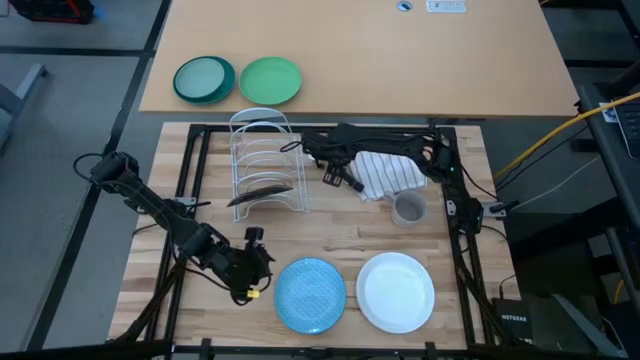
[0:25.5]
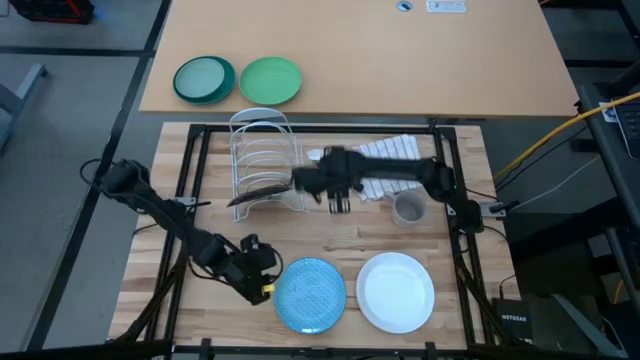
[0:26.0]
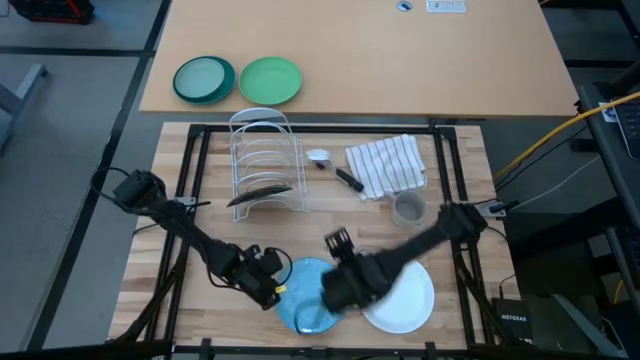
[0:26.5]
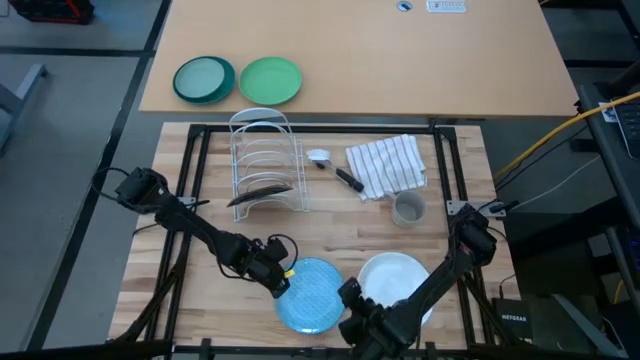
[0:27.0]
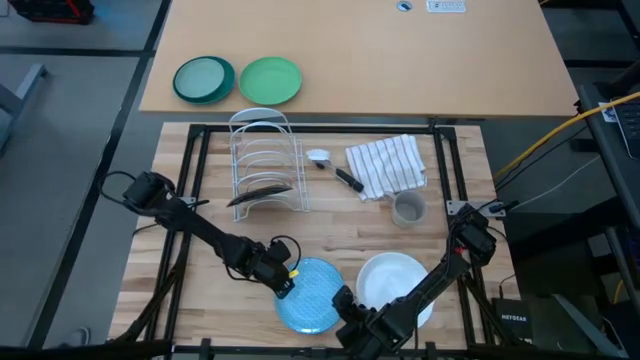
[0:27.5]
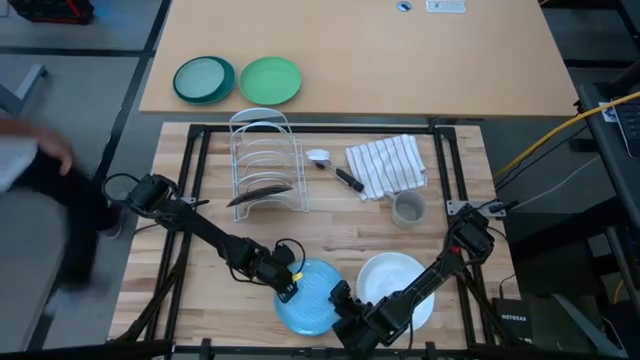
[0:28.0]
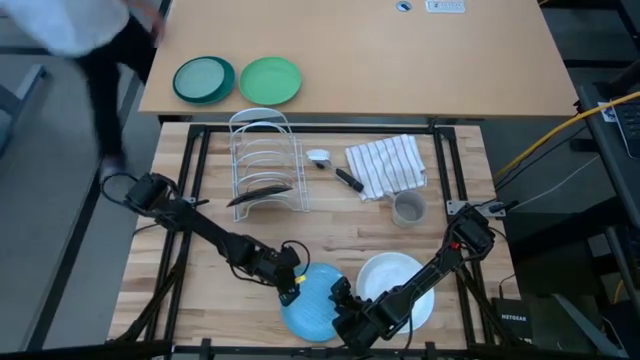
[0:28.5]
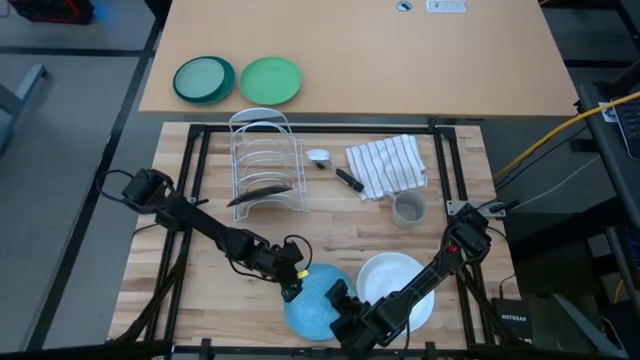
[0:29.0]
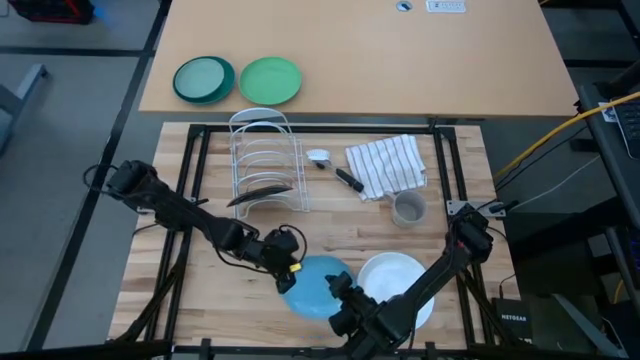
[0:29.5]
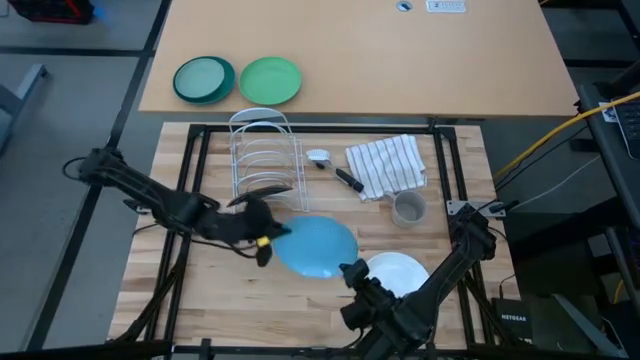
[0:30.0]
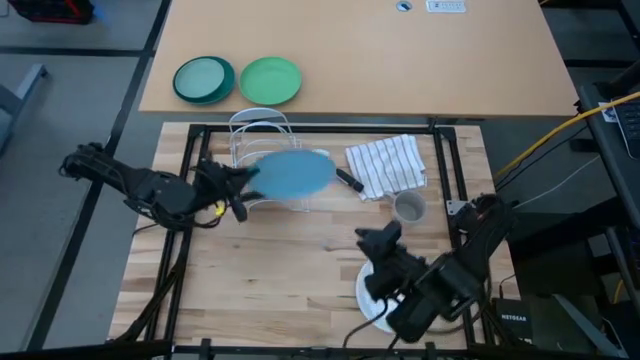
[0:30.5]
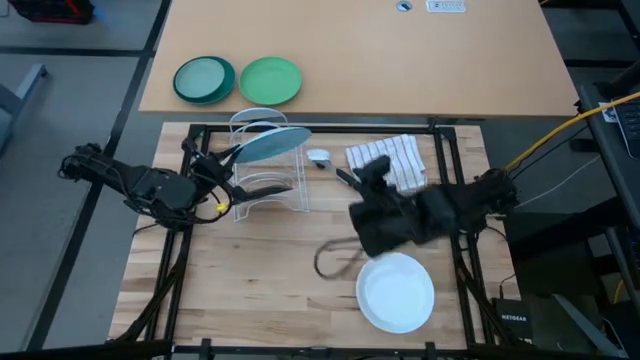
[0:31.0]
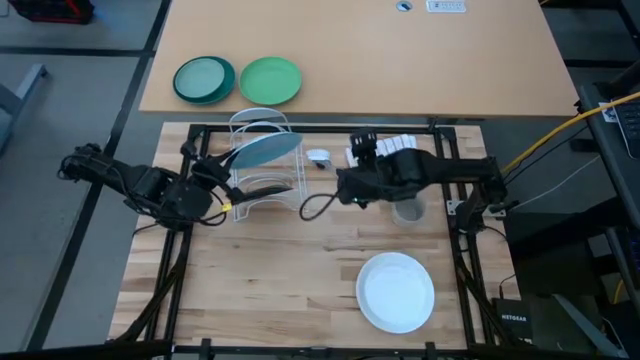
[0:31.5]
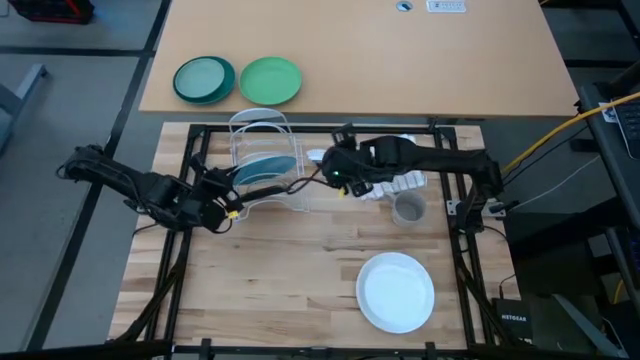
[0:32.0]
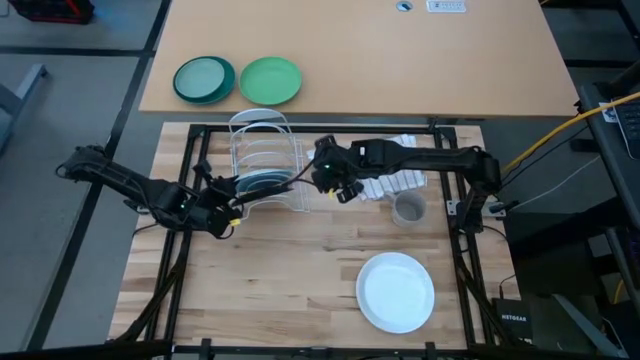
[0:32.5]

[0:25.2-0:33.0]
Task: Sort dishes
Put the blue patterned plate in the dish rack

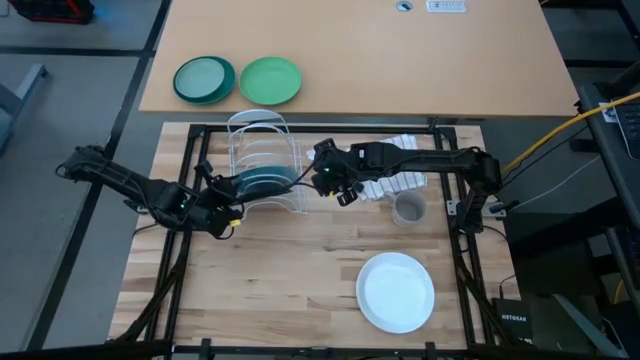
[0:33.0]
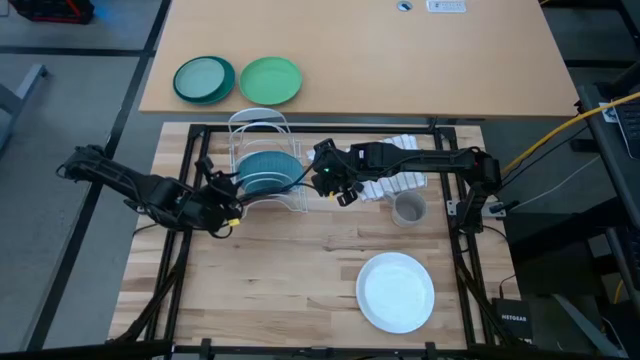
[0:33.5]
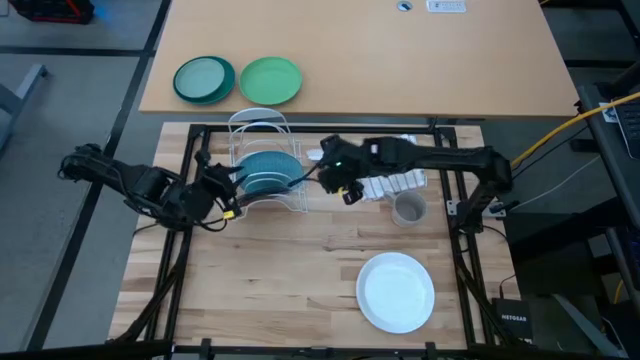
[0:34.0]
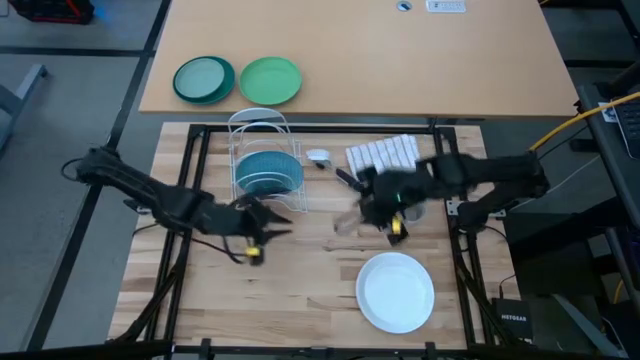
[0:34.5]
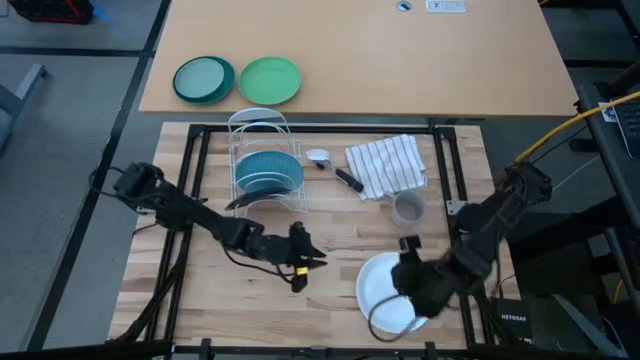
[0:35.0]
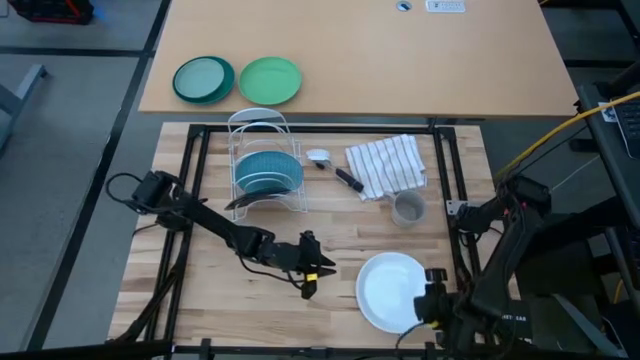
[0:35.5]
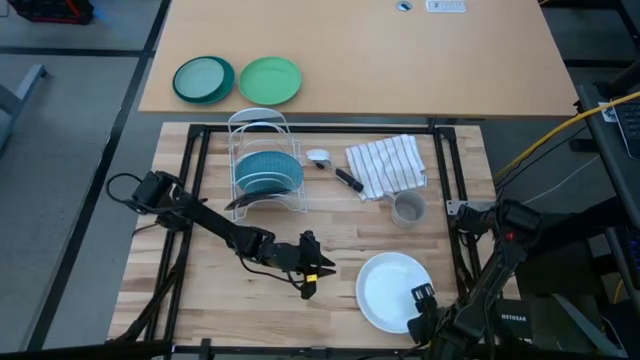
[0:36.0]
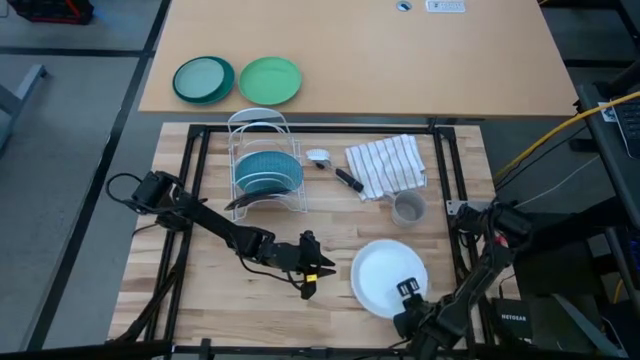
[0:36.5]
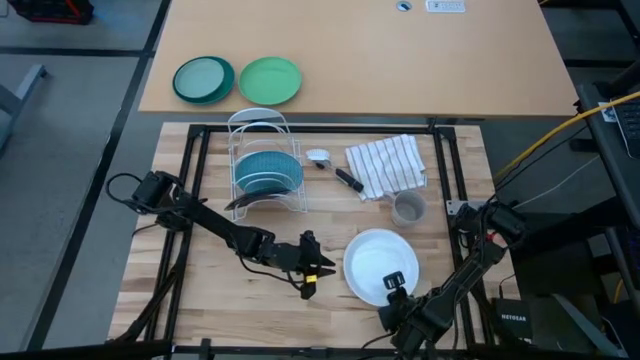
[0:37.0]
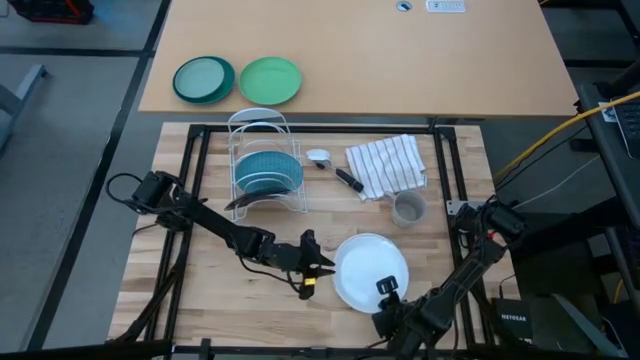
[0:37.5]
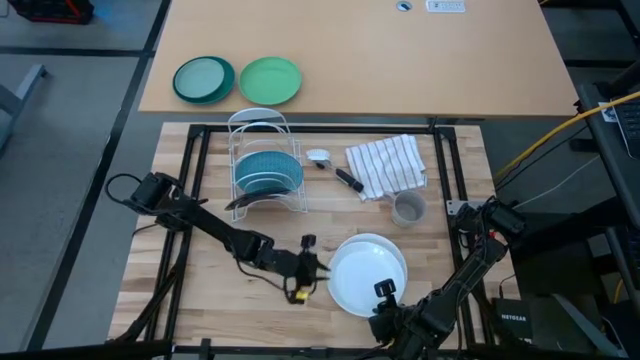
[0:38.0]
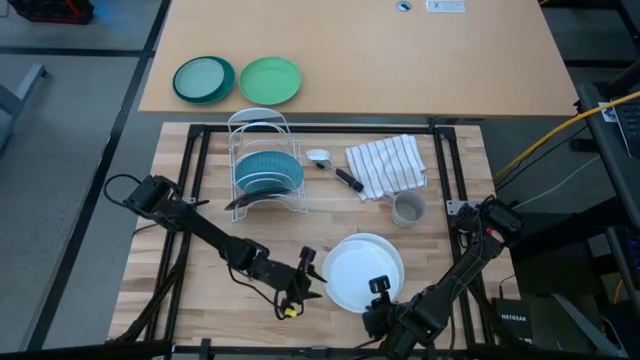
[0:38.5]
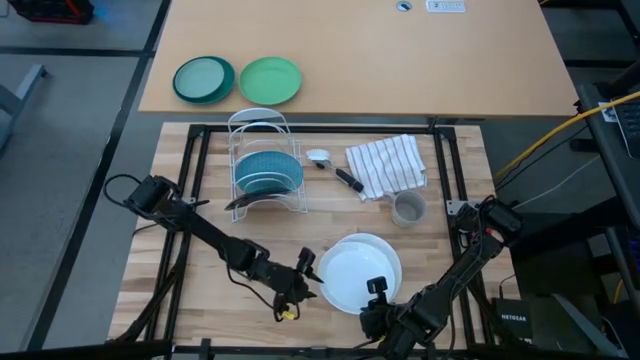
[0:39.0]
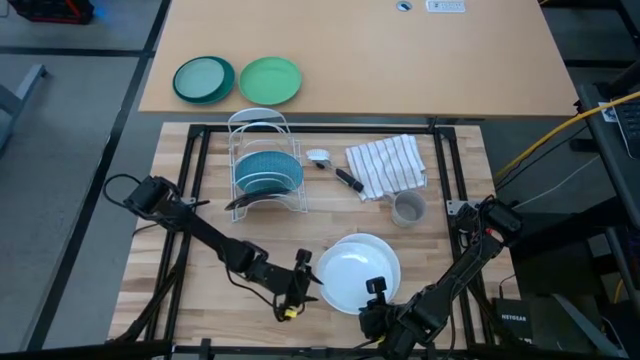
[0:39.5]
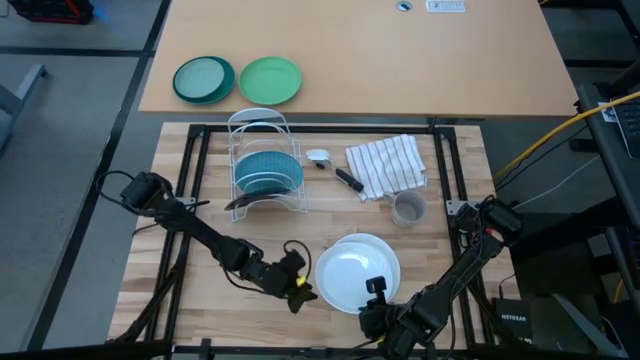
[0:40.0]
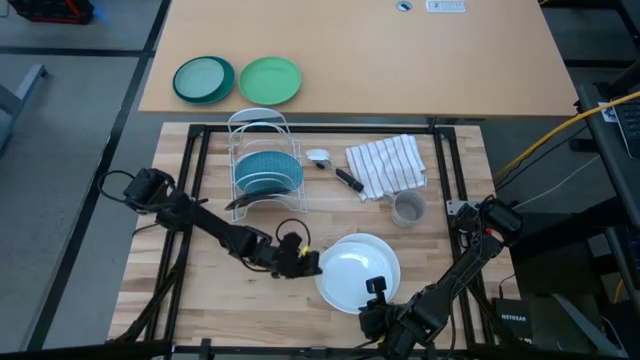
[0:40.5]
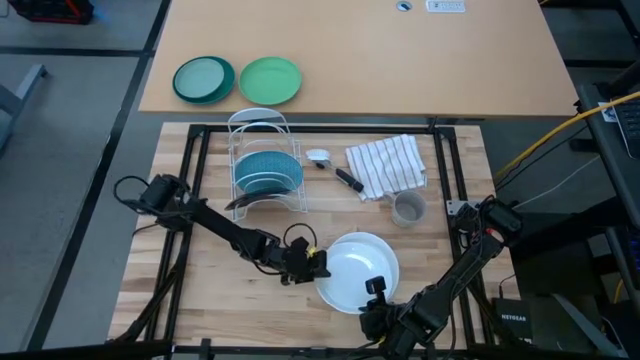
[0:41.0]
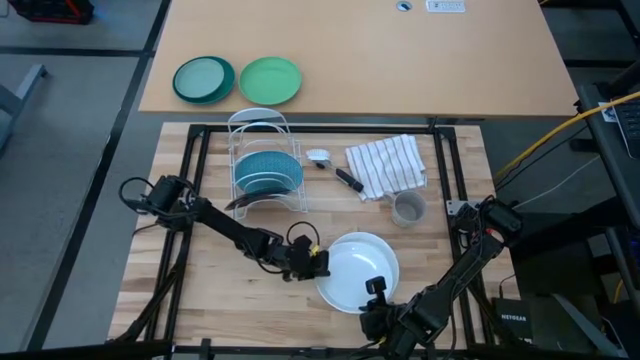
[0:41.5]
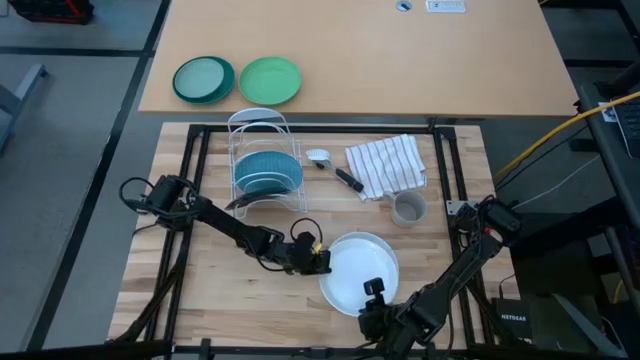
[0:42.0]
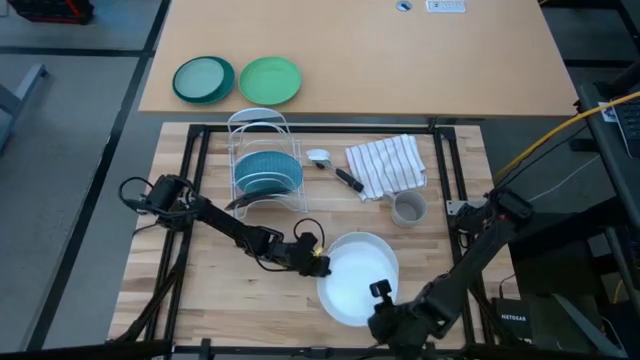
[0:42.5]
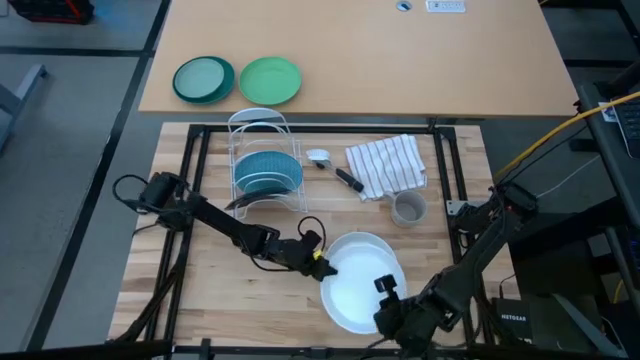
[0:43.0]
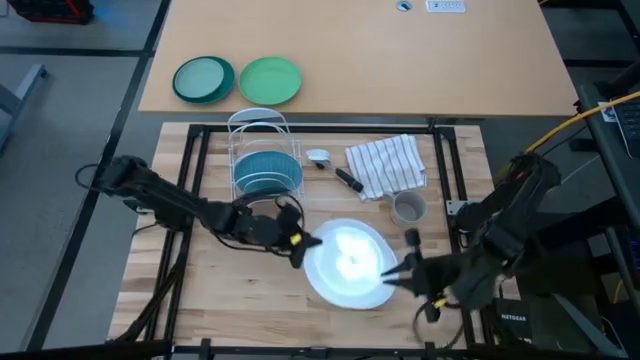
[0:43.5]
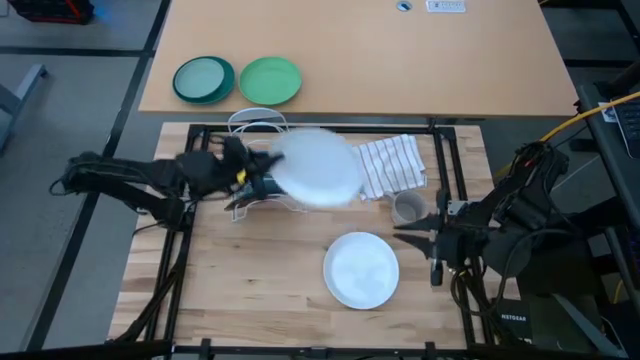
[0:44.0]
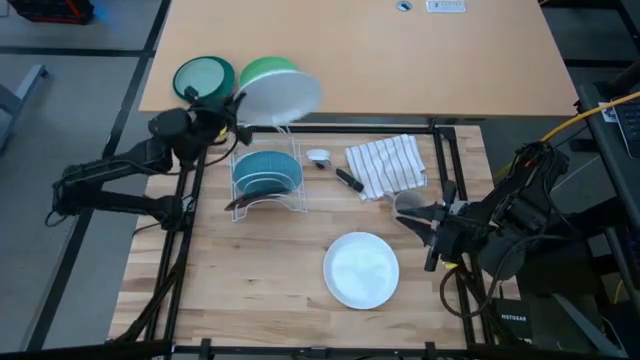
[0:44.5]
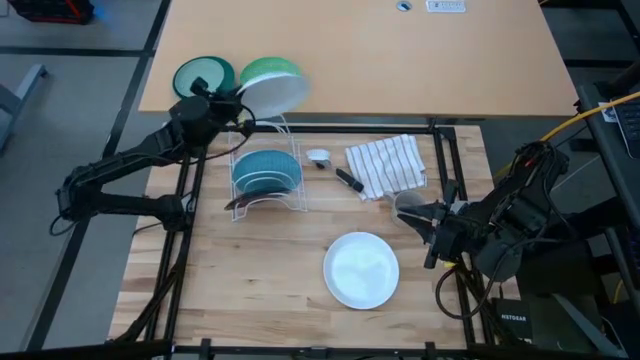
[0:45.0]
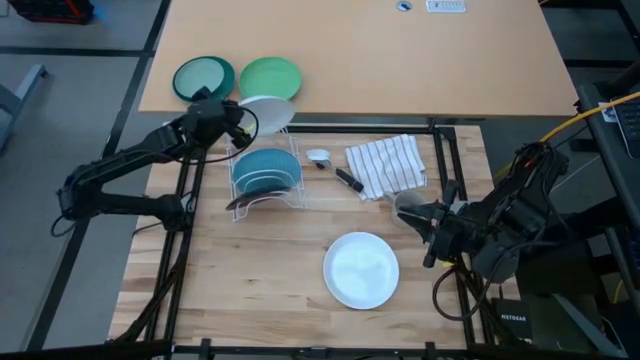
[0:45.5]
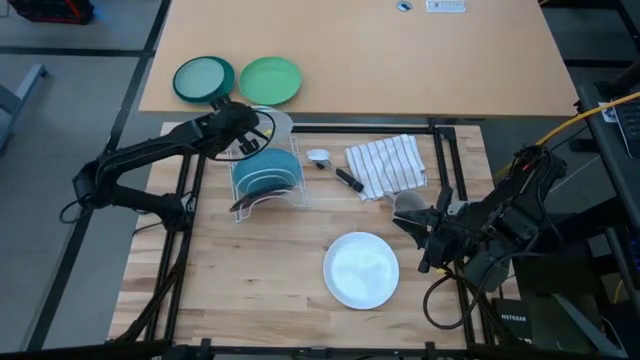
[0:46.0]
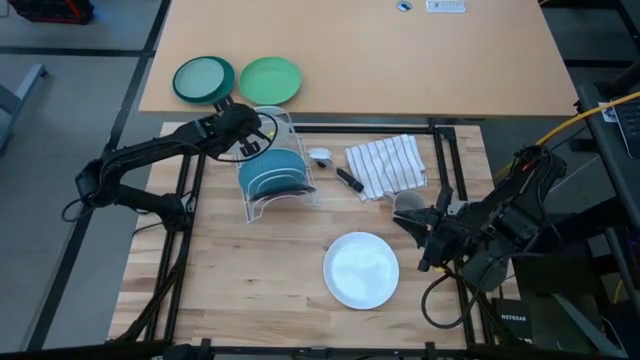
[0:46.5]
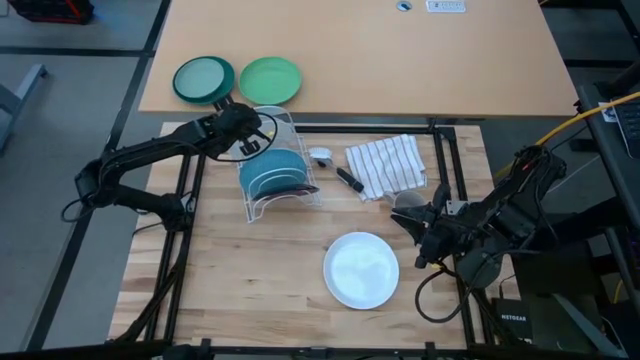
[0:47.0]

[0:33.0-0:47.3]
Put the white plate in the dish rack
